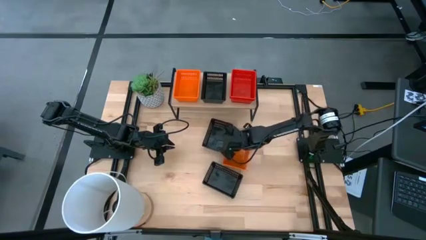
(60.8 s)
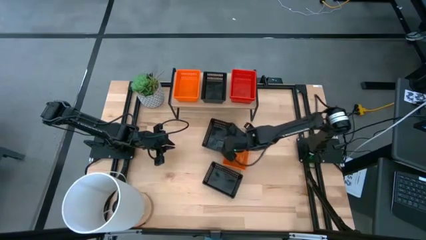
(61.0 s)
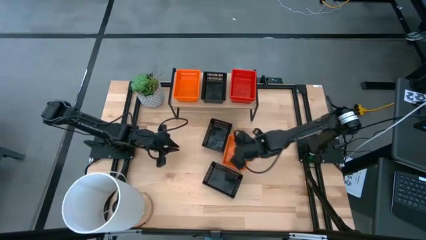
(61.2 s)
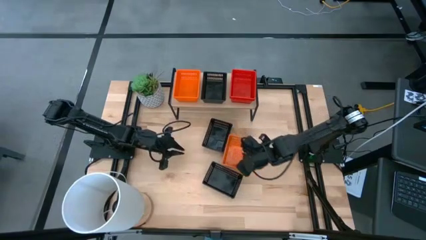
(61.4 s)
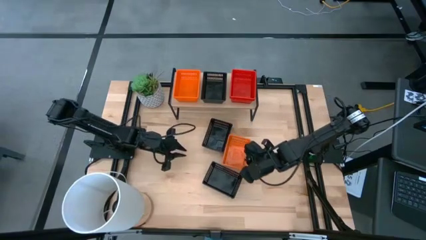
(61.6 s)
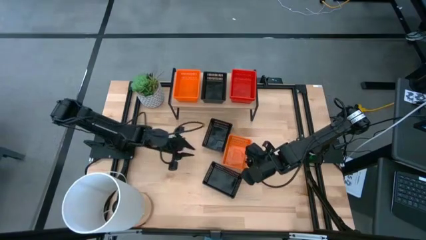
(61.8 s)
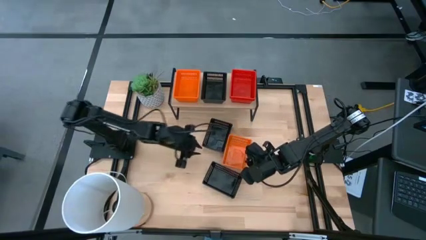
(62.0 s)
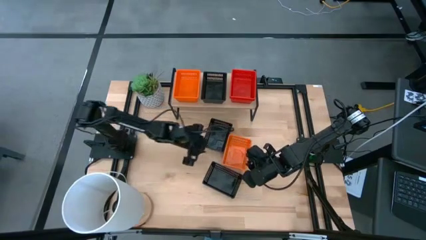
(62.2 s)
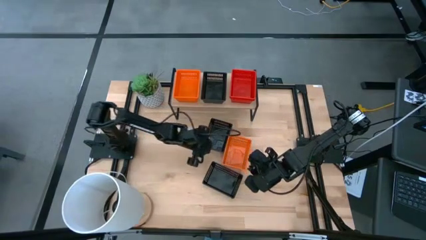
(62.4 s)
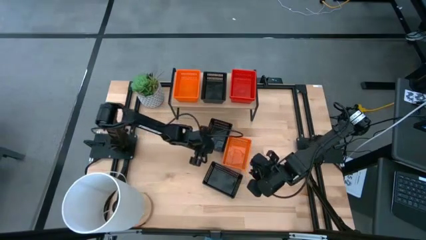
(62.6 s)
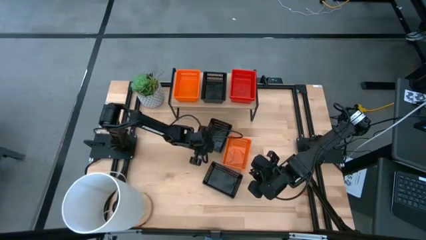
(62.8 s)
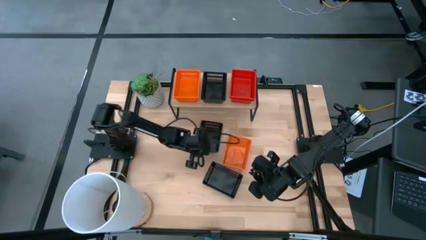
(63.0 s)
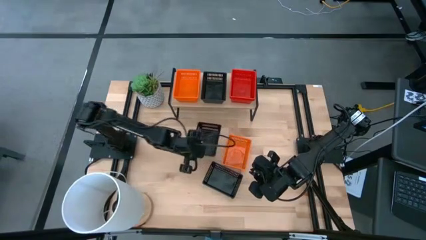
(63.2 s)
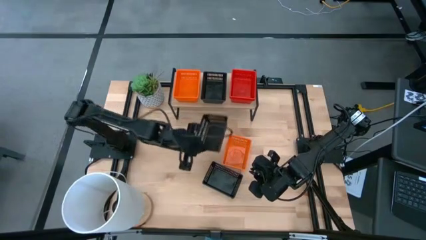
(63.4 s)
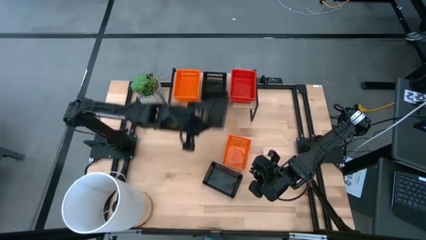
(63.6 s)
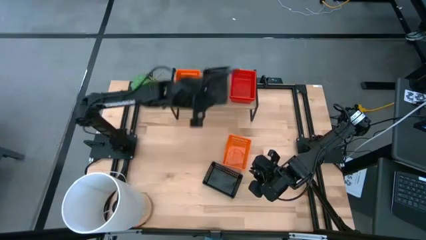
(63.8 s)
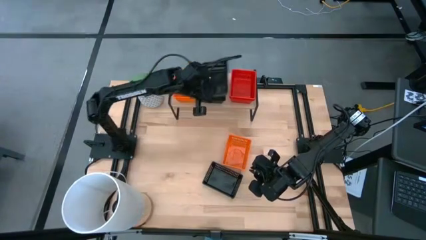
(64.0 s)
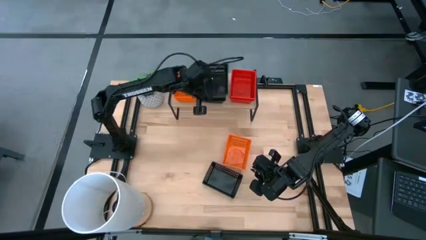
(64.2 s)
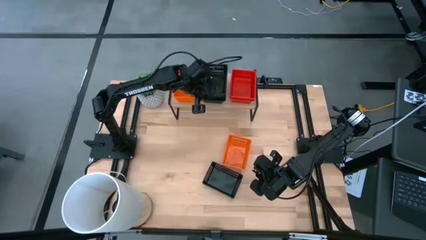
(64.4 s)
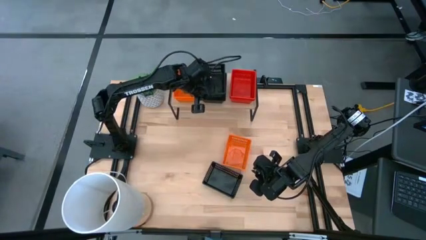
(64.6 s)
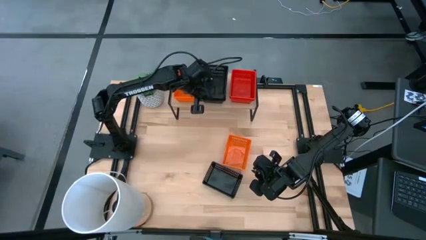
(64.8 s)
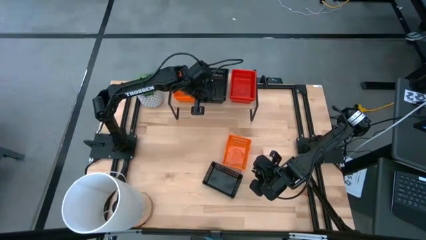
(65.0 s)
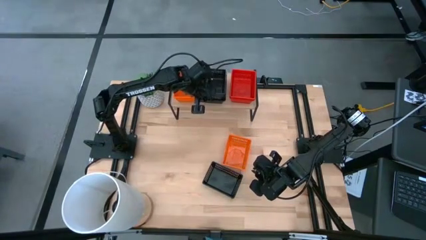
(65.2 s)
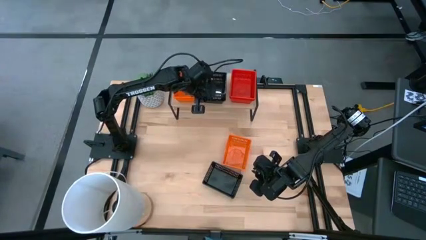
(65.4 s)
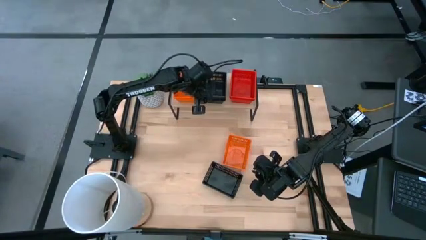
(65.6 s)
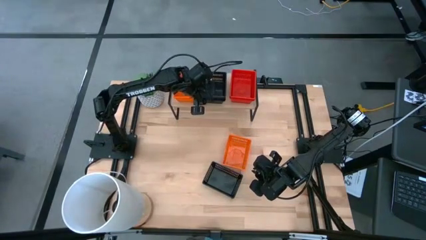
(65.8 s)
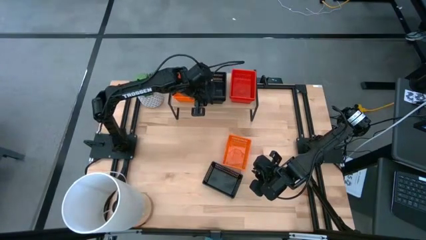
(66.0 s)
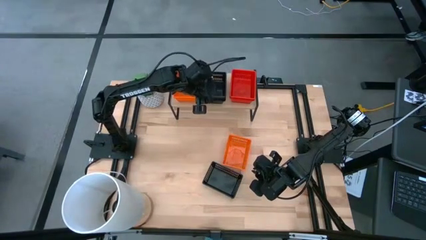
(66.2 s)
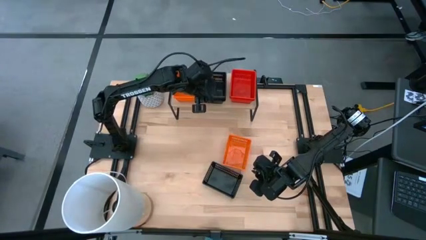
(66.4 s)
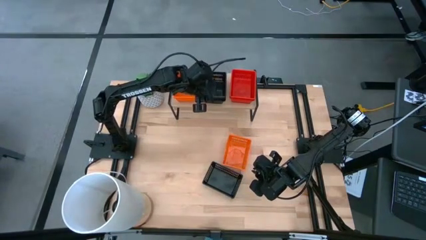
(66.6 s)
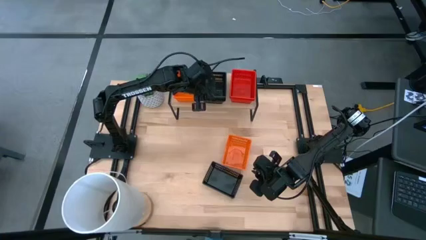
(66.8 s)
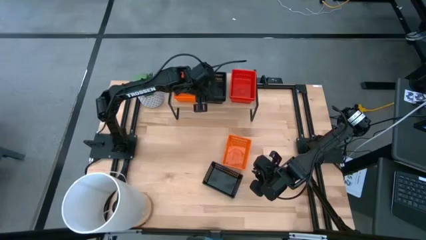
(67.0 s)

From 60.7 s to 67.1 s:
Task: Stack baskets on shelf by color
Stack the top black bin on top of the black bin on the shelf

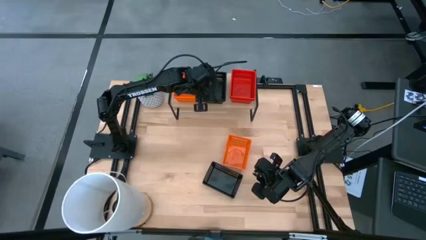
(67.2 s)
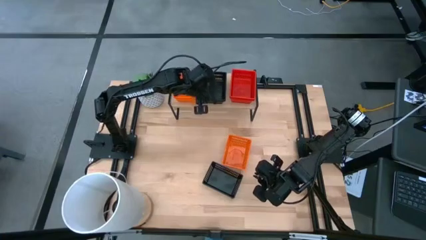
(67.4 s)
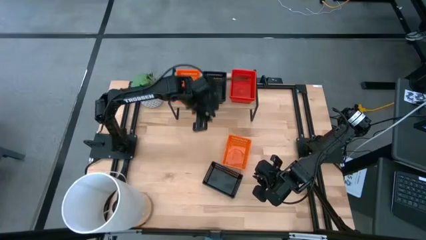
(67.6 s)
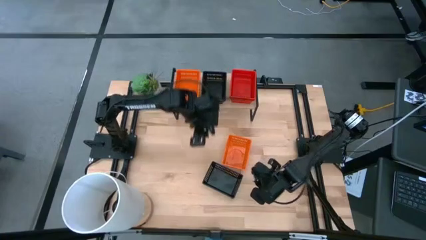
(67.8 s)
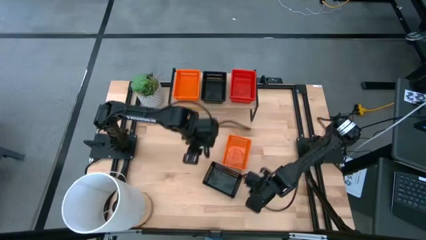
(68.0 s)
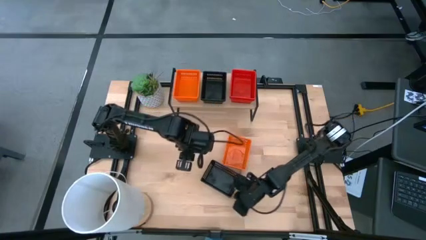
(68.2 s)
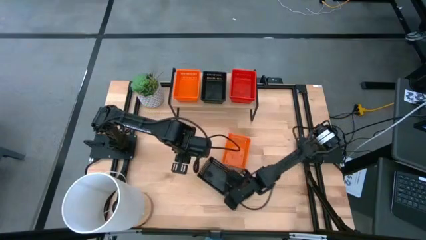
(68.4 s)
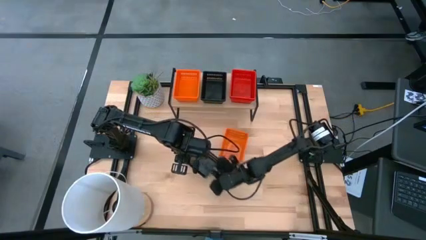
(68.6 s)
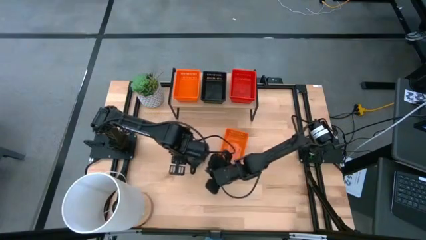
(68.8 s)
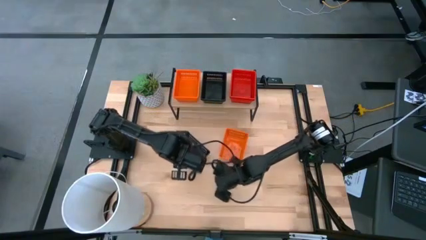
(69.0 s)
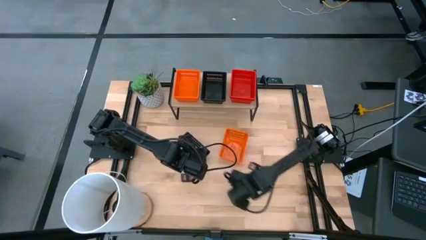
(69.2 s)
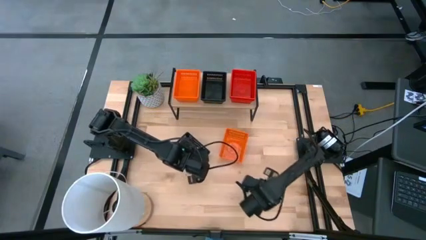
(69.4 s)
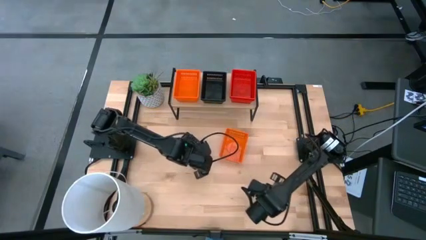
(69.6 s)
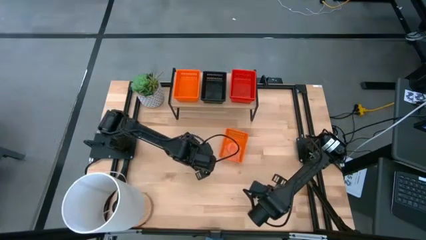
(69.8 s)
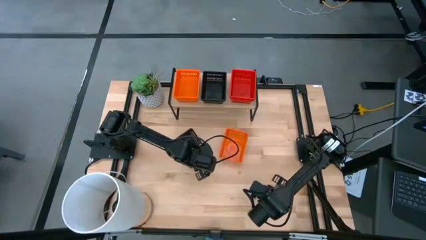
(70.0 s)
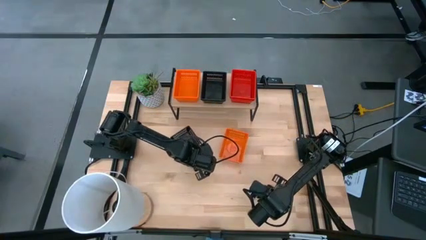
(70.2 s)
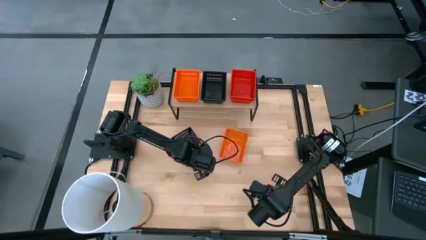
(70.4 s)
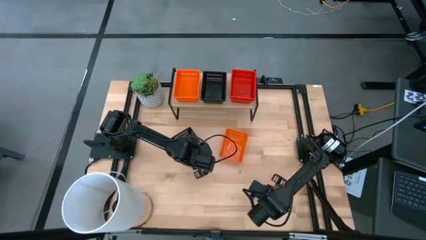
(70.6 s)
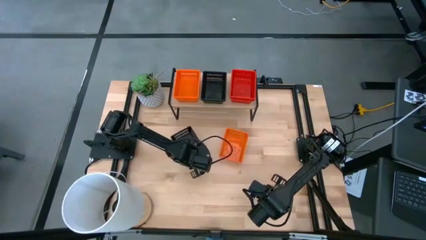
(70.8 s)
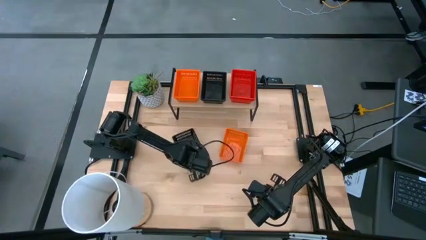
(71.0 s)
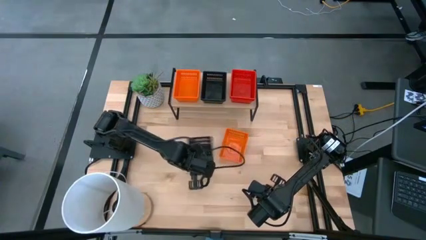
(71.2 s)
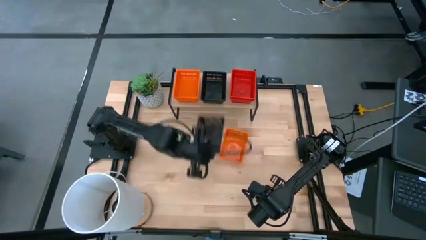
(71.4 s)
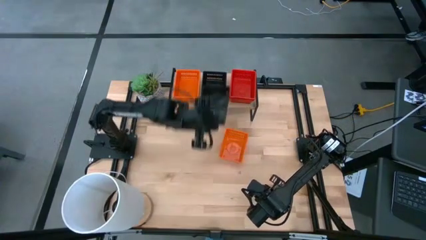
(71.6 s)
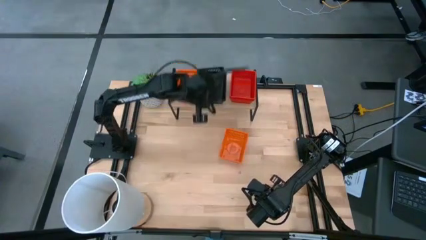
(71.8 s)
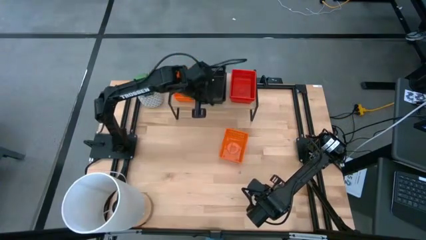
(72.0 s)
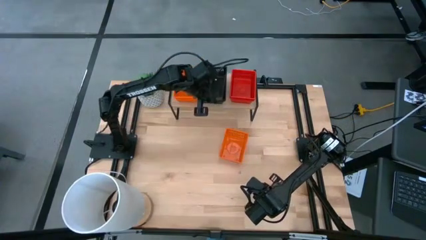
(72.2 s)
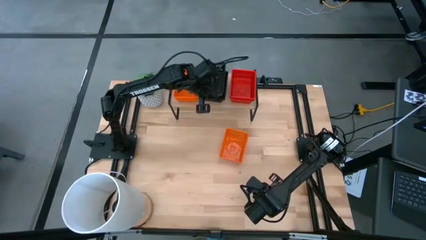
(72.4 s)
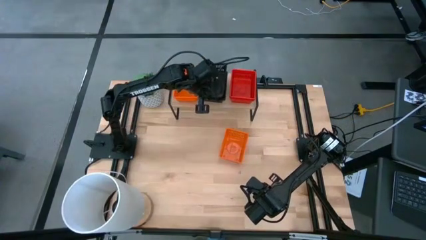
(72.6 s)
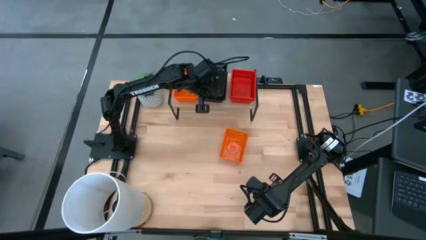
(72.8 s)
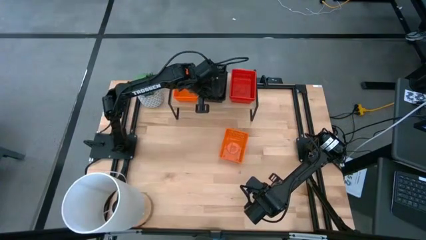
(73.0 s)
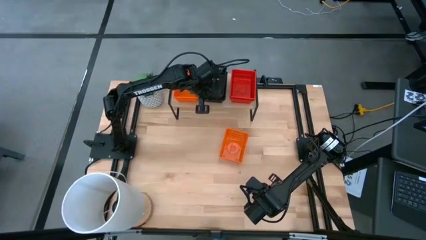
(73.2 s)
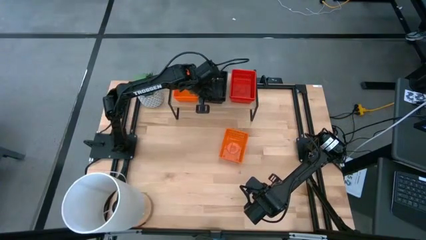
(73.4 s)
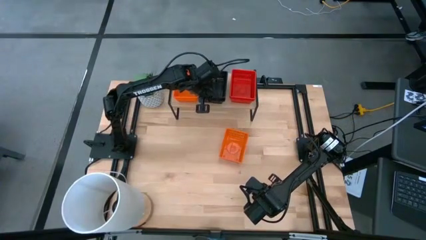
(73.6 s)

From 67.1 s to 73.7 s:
Stack the black bin on top of the black bin on the shelf

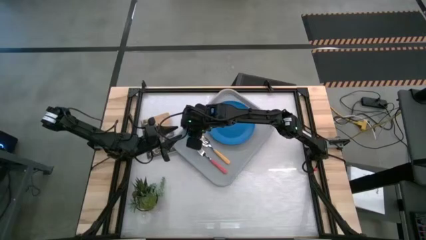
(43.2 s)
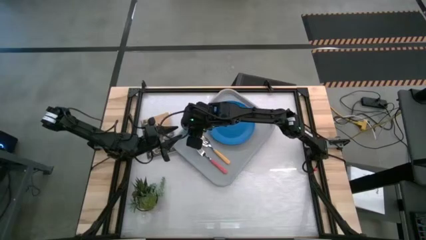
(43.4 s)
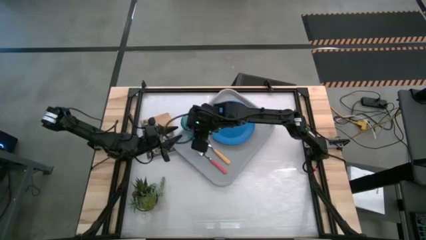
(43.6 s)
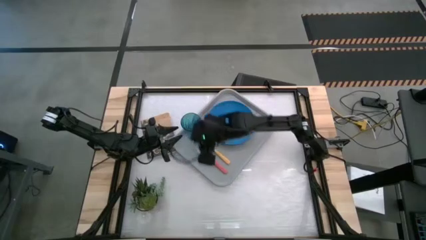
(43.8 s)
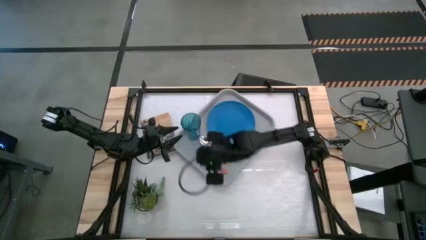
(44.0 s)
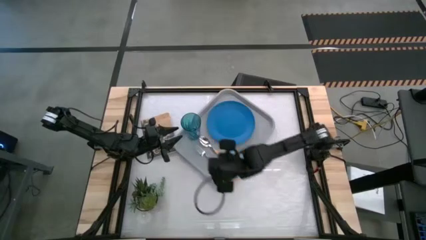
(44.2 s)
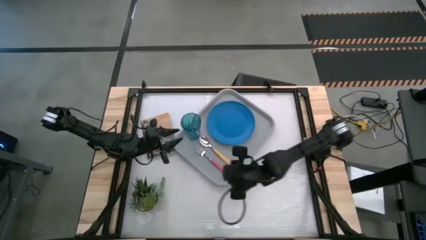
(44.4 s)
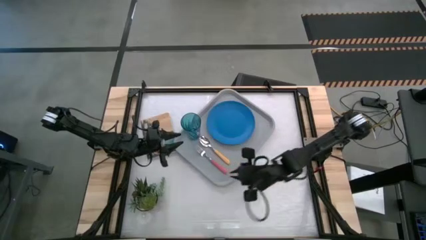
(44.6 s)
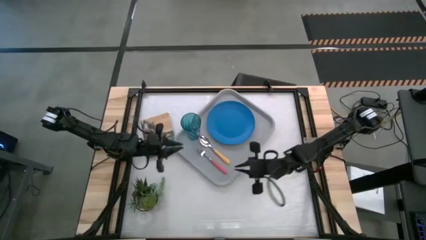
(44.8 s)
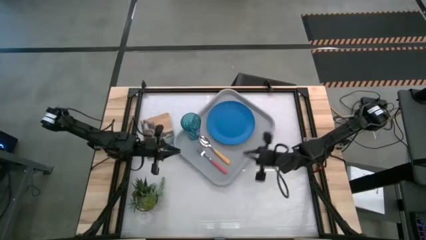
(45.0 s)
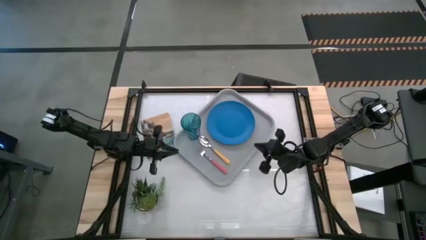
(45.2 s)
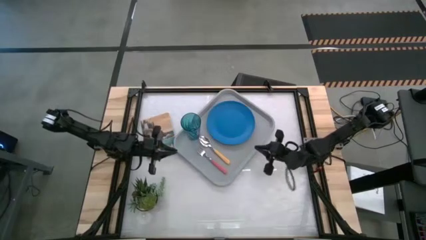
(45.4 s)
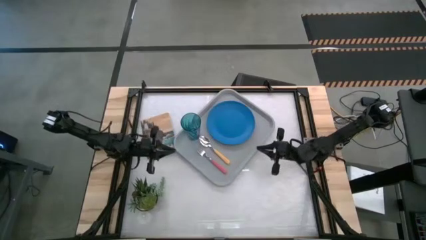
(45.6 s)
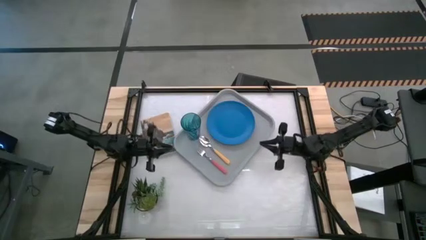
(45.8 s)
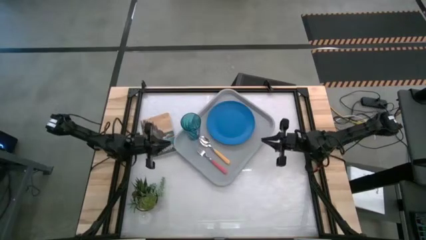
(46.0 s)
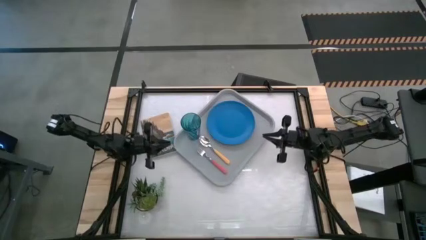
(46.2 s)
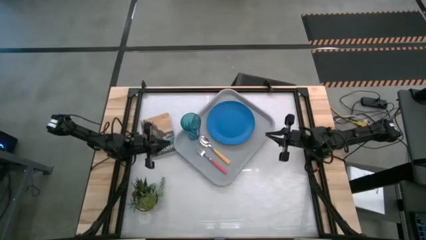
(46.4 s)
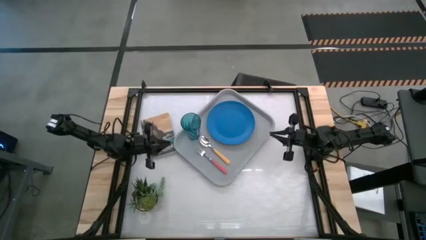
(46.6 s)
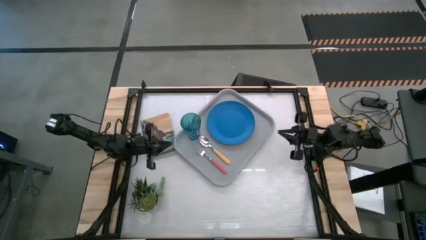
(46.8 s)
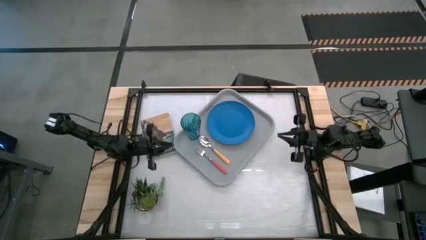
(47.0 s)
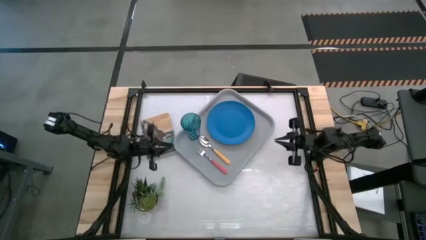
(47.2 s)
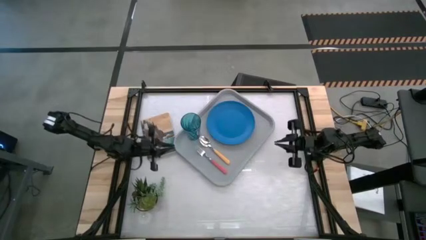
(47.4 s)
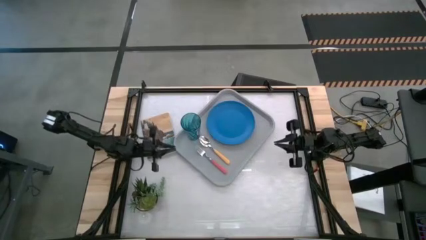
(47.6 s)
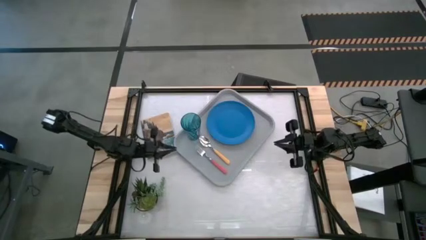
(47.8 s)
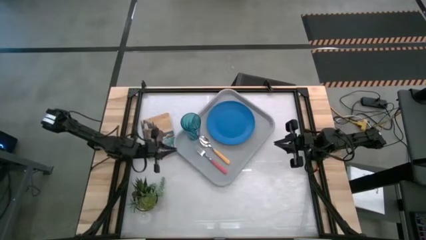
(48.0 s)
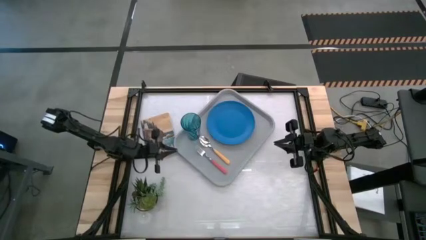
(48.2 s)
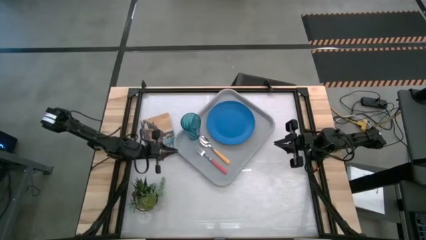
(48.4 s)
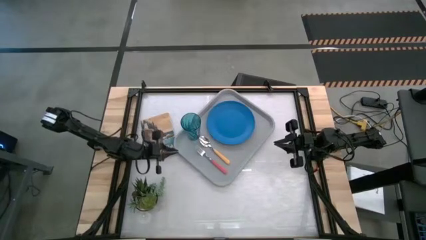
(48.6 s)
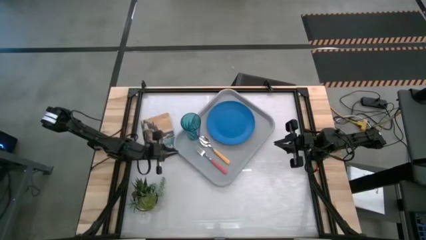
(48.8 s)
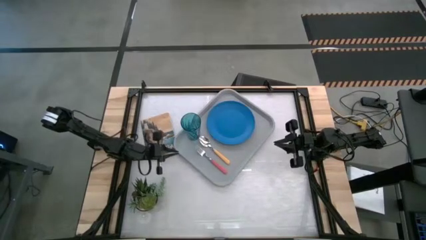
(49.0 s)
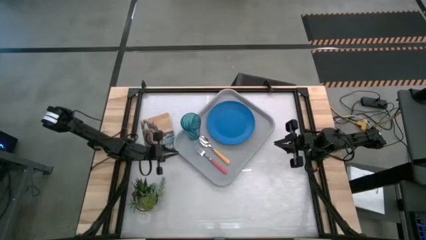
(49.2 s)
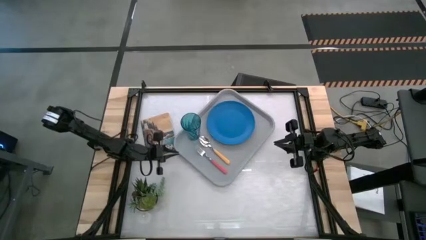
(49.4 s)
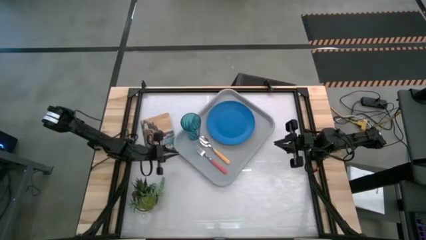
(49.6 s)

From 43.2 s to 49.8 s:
Task: Pick and place plate/cup/fork/spoon on tray
Return to Home Position
